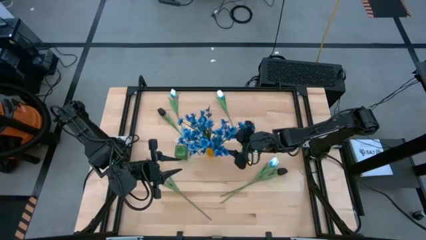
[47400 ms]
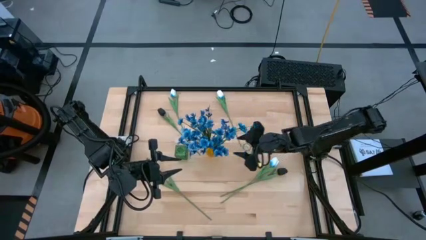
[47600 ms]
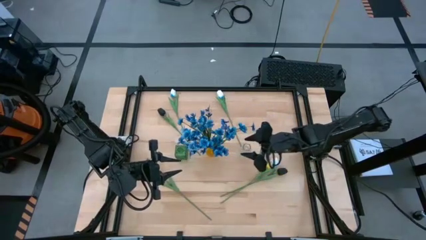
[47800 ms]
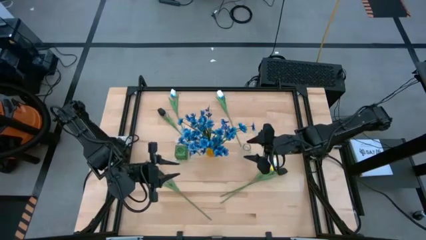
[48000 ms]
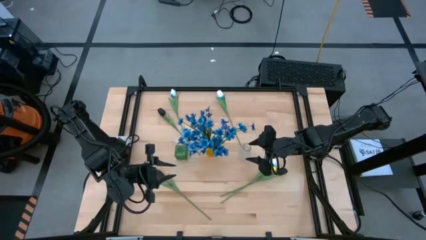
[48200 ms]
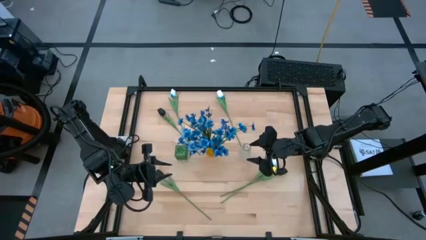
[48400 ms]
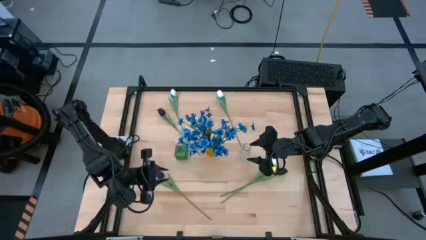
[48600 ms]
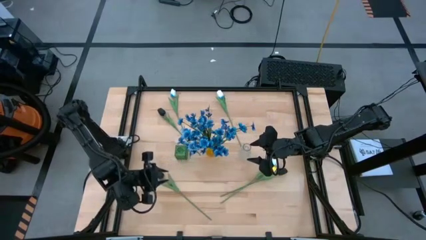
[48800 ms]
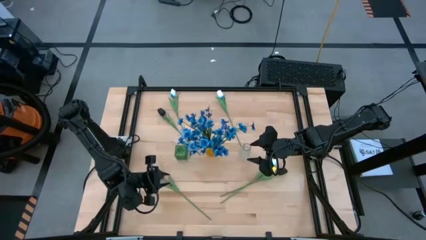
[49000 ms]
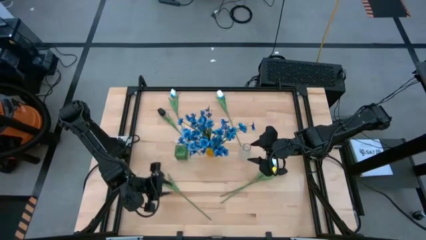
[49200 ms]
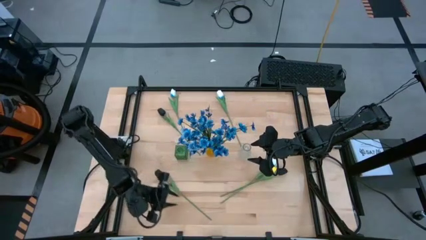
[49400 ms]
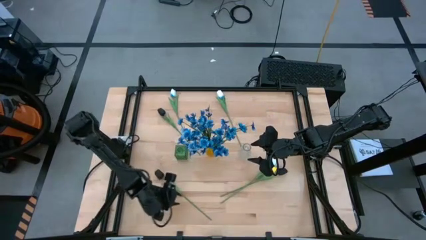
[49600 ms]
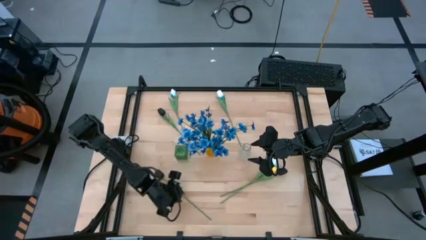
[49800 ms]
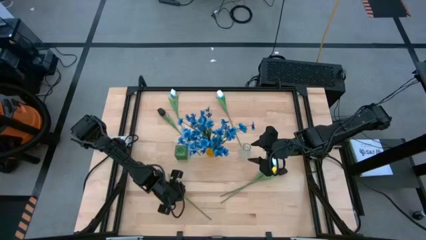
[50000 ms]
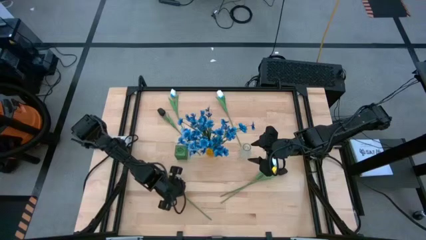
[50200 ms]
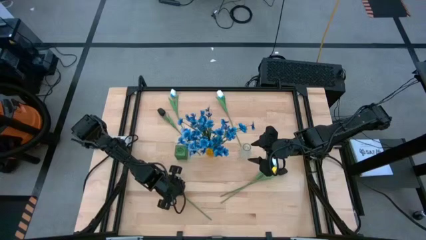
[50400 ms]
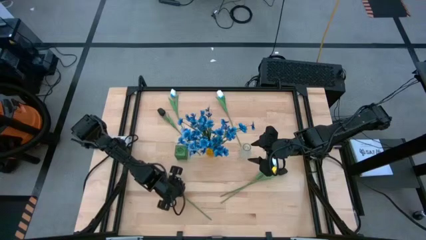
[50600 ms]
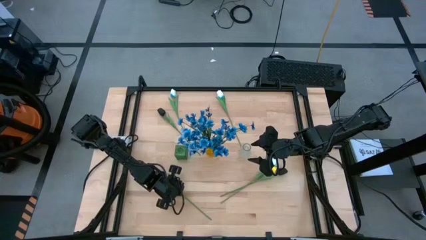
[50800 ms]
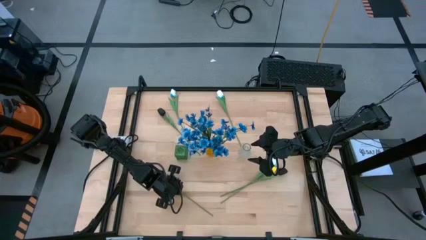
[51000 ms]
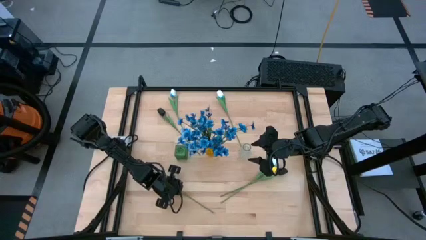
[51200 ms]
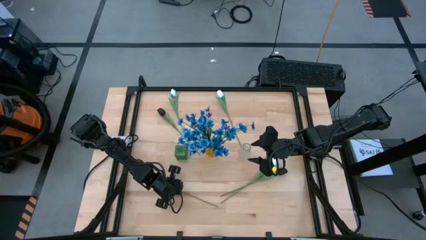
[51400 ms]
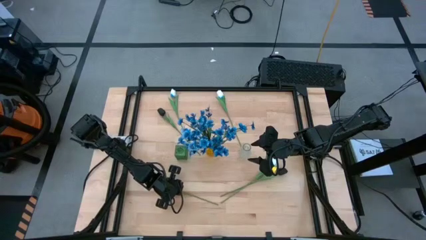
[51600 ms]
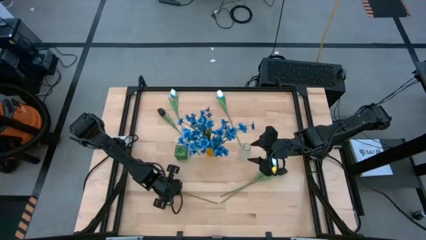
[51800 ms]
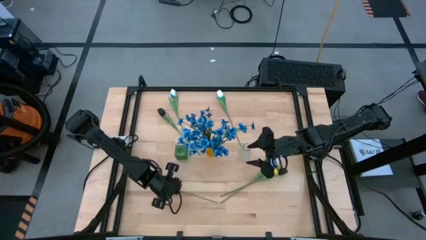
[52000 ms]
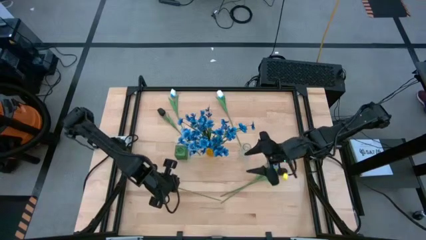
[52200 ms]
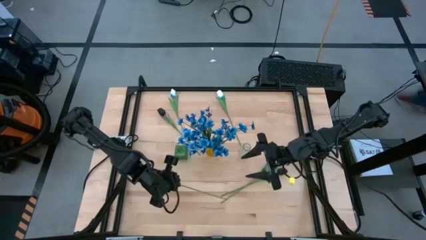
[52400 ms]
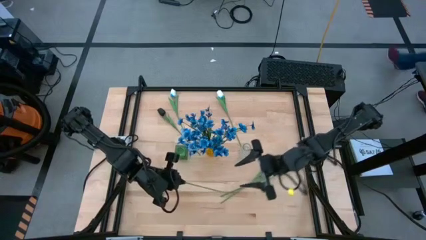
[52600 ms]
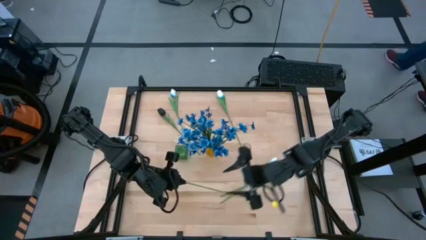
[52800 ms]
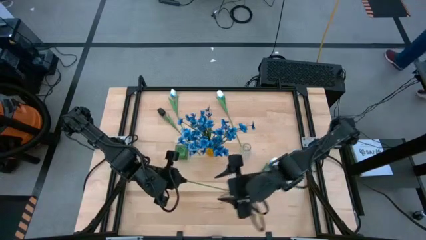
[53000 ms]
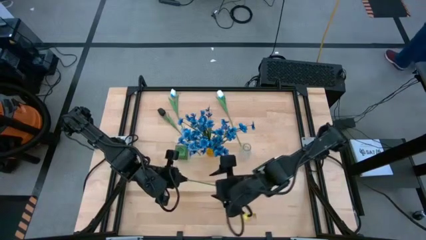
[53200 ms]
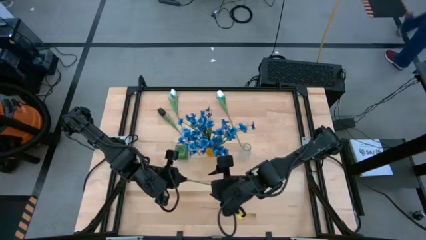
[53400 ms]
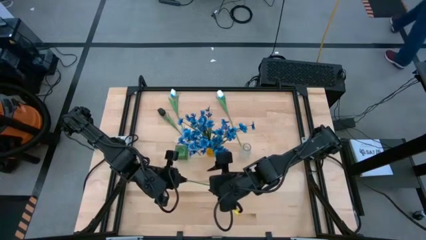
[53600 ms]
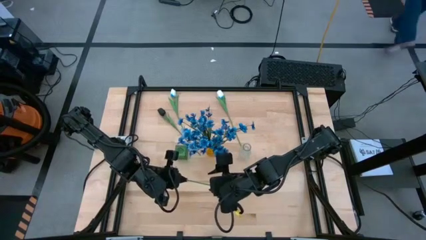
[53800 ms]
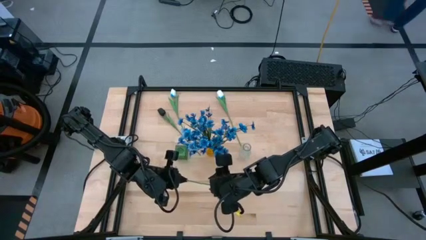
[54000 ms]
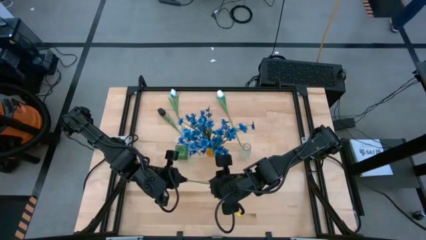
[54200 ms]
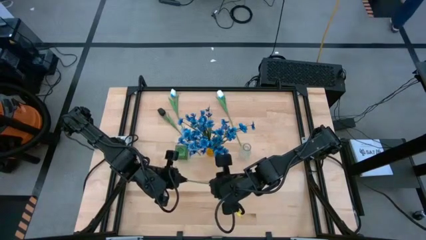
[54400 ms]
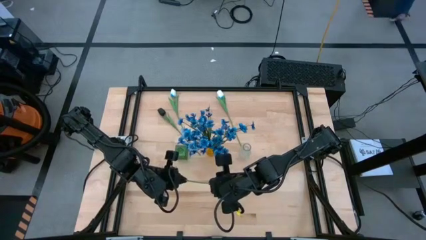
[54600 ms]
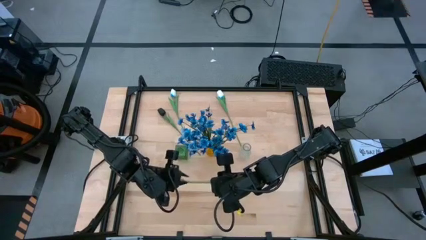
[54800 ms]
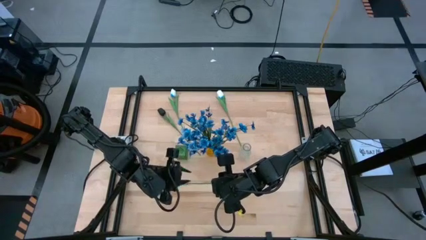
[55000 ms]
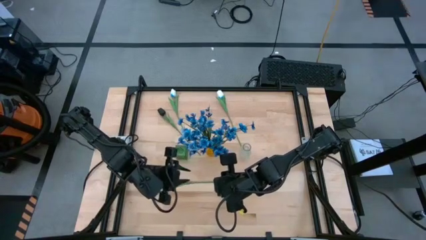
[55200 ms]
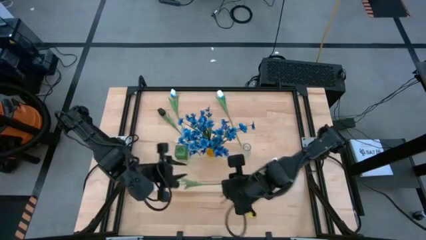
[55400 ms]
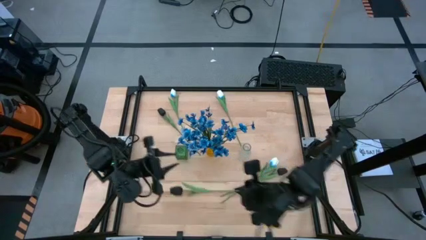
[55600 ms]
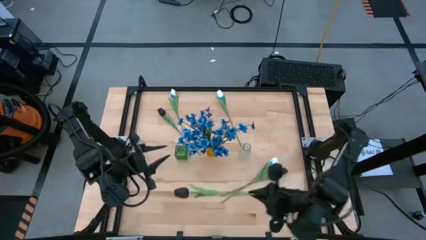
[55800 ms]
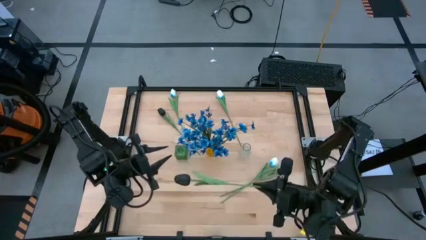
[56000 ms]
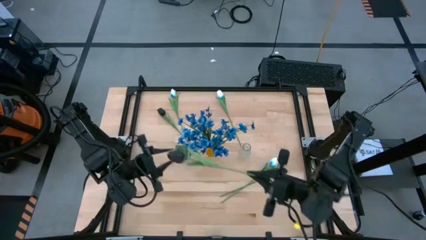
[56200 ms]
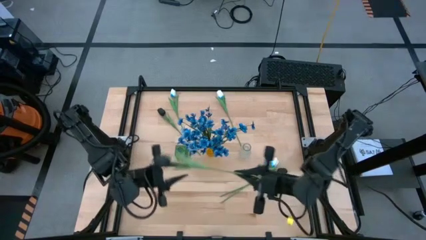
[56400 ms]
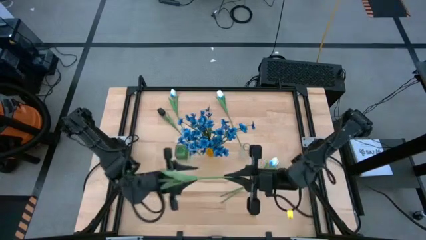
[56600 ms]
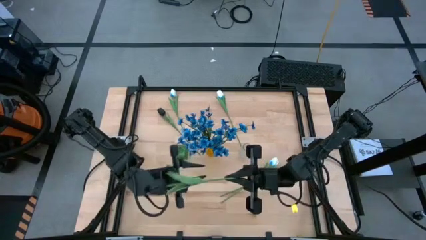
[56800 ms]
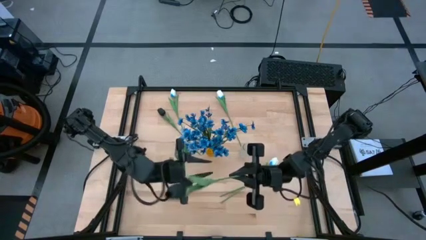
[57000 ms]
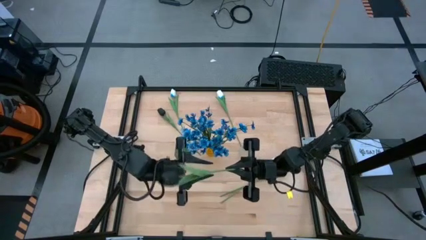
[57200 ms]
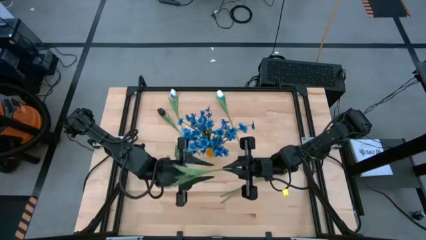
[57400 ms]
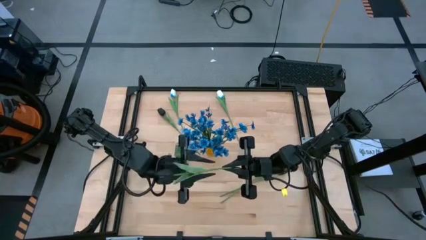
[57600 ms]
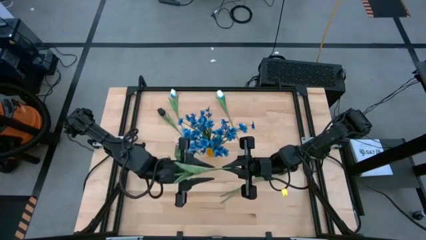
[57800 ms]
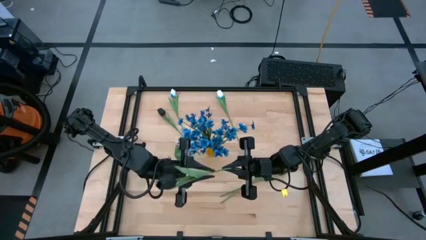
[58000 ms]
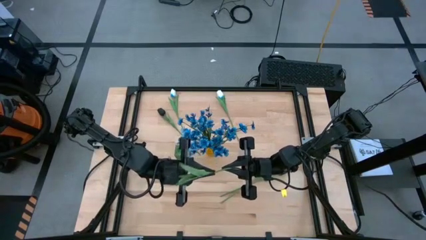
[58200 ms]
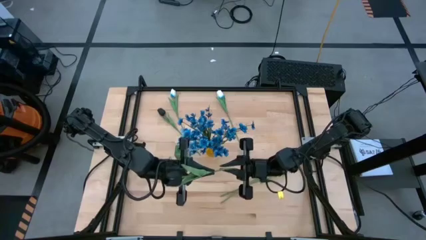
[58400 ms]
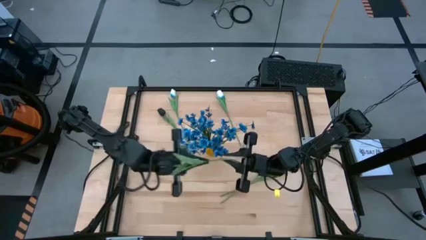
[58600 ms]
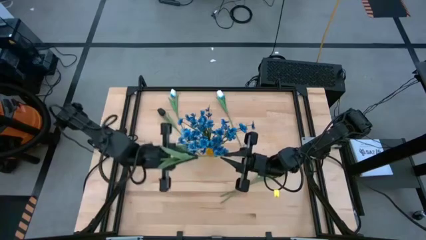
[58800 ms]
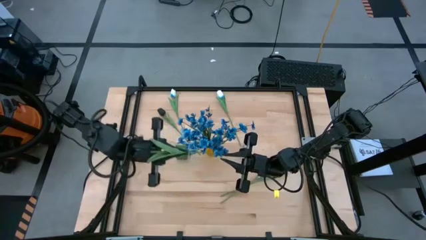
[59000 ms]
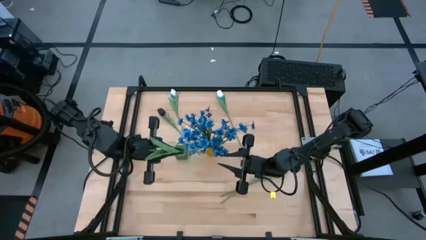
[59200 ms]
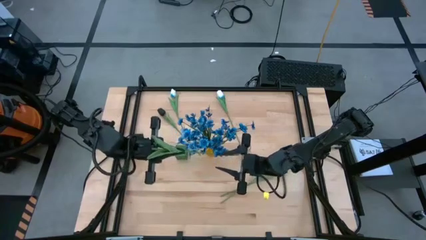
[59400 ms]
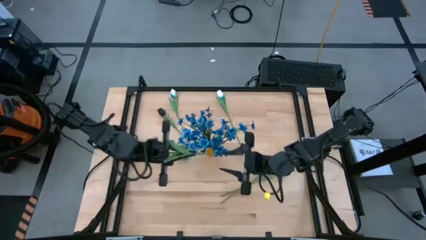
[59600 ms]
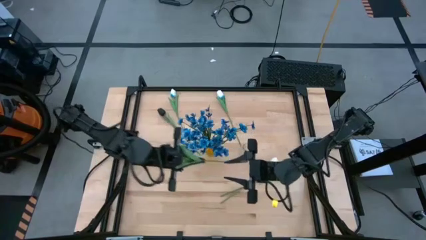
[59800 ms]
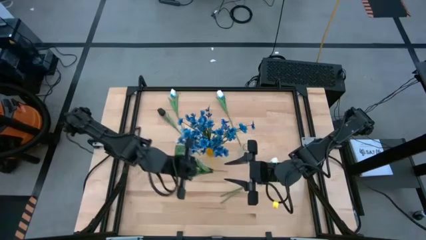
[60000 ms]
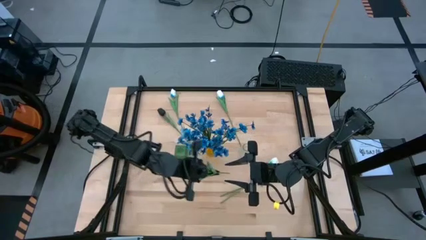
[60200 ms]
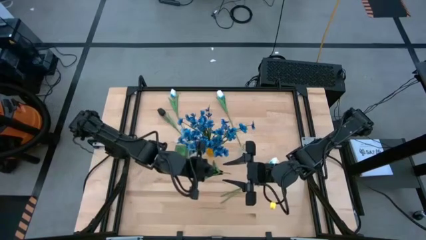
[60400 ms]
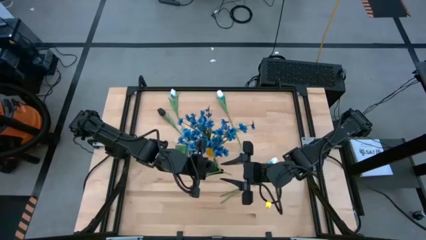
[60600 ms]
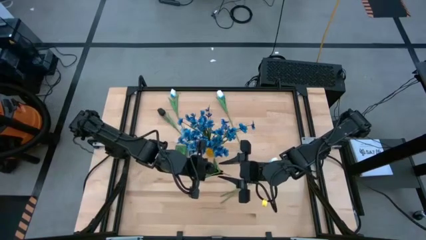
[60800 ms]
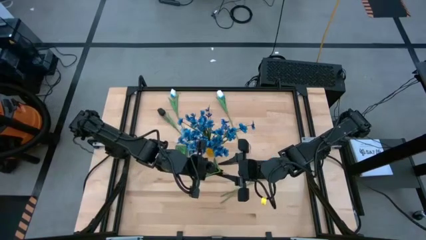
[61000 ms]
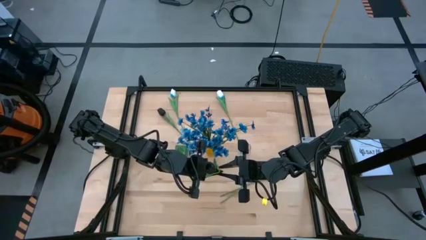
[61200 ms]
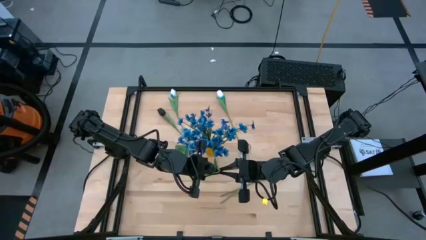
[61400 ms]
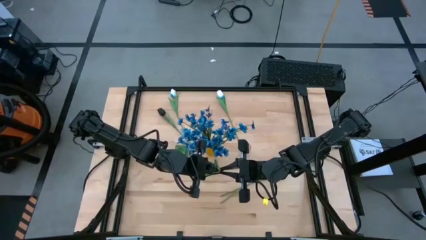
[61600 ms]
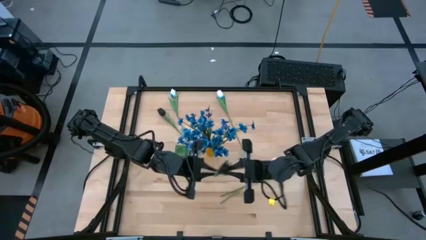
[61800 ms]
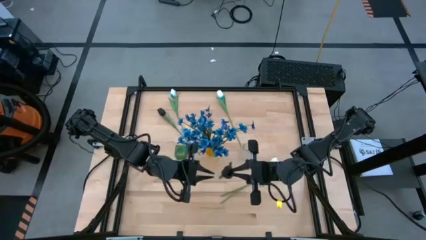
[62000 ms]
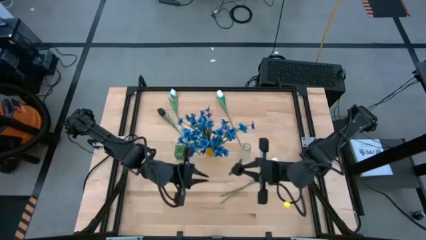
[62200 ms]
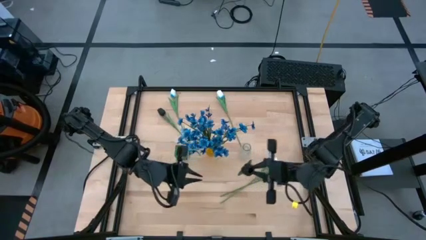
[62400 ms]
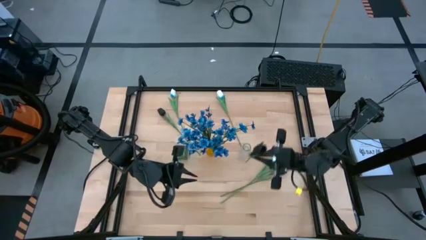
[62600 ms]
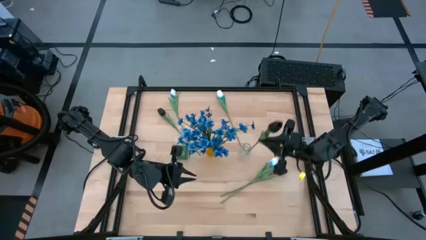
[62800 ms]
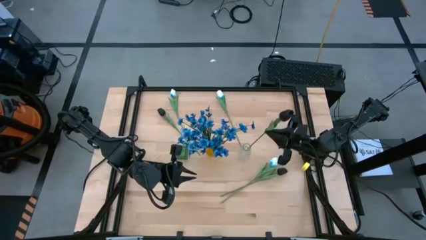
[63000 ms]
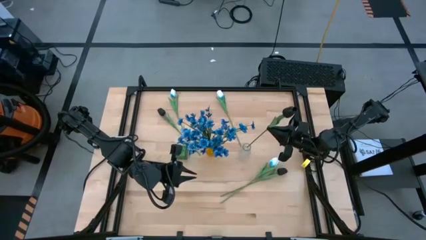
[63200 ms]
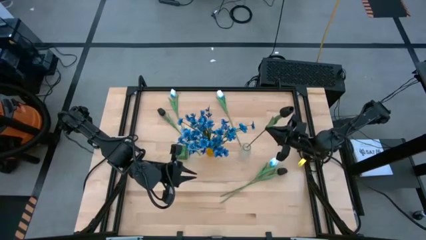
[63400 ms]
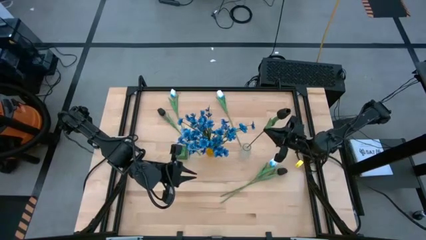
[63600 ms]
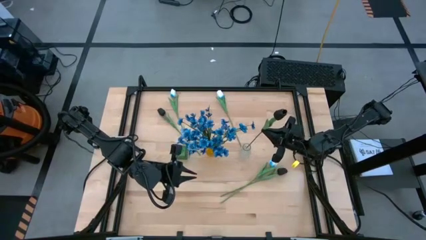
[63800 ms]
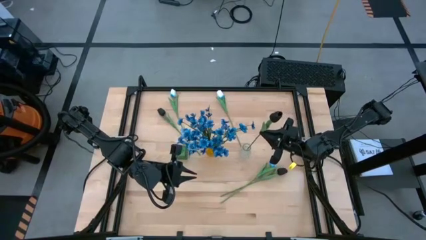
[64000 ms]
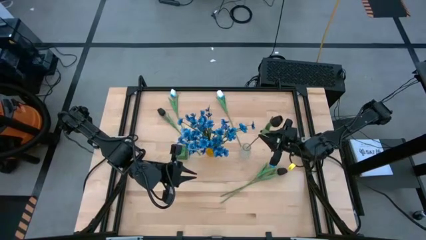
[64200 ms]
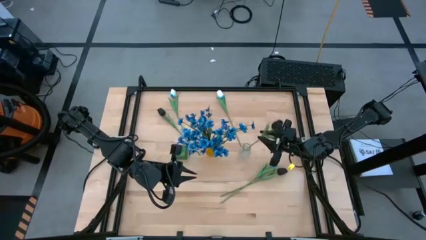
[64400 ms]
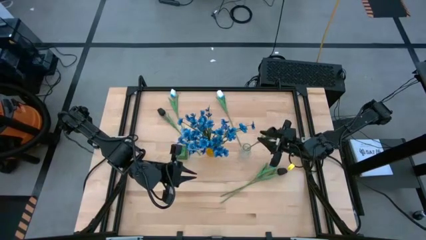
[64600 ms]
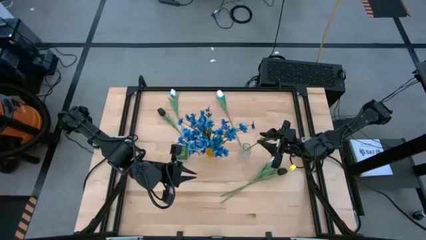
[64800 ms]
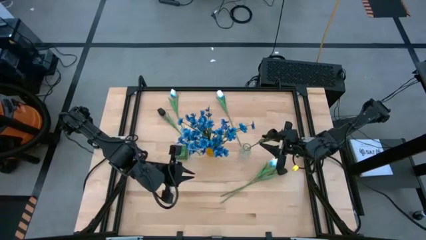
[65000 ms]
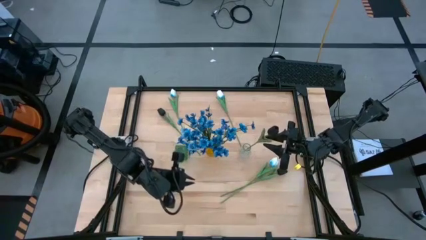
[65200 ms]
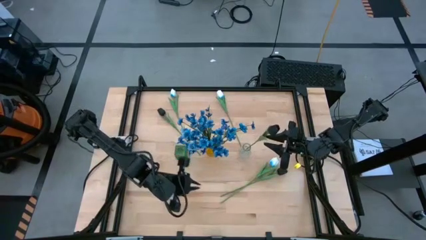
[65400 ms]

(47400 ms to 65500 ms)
Task: Sort flowers into vase by color
Put the bottom left black flower into the transparent vase
